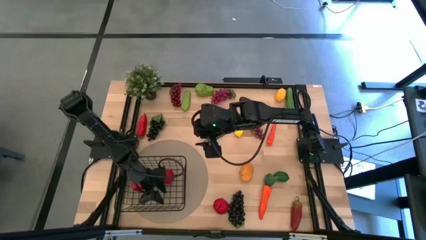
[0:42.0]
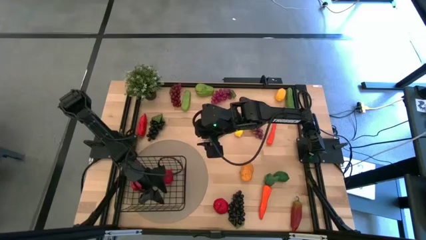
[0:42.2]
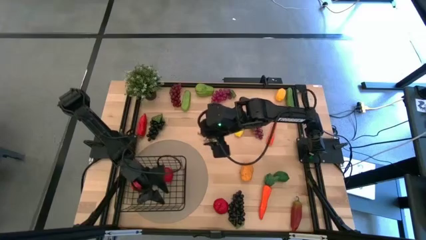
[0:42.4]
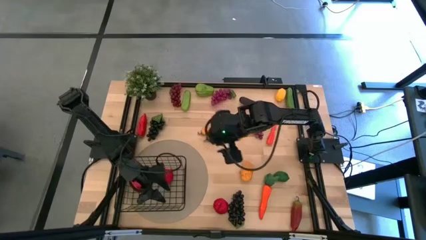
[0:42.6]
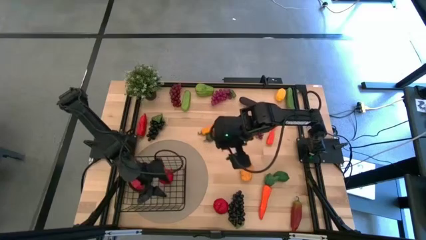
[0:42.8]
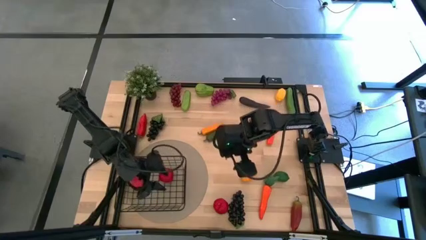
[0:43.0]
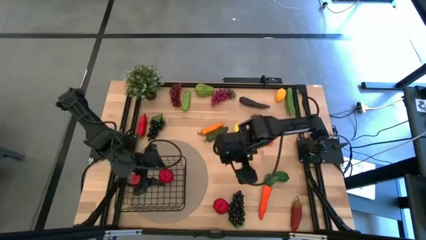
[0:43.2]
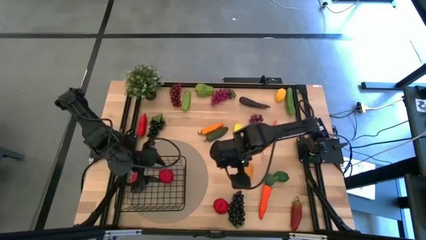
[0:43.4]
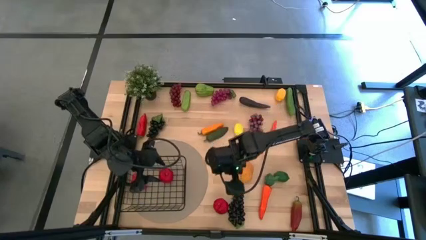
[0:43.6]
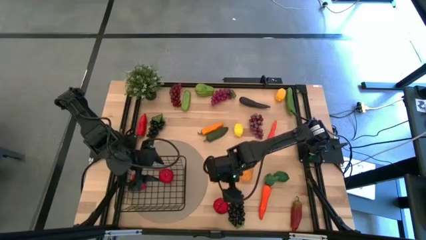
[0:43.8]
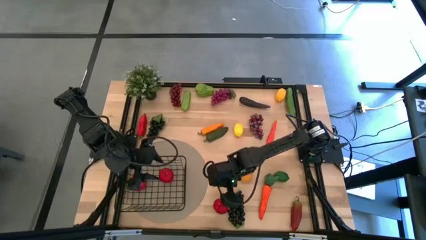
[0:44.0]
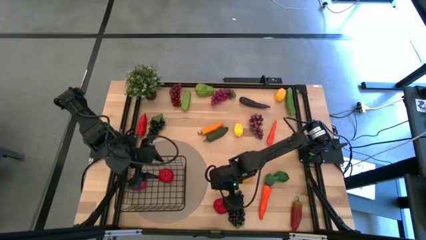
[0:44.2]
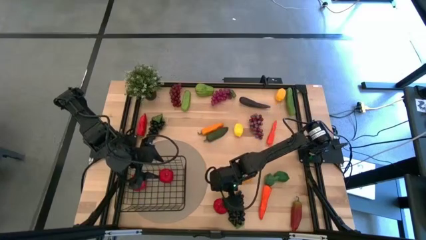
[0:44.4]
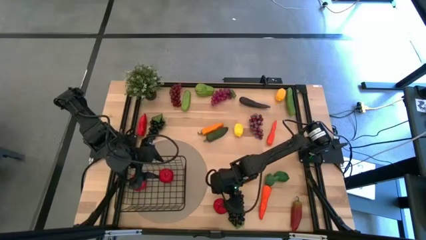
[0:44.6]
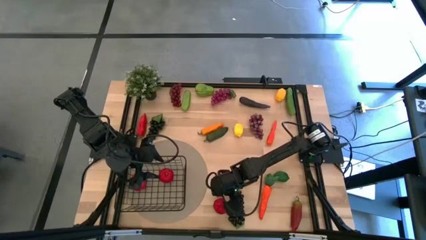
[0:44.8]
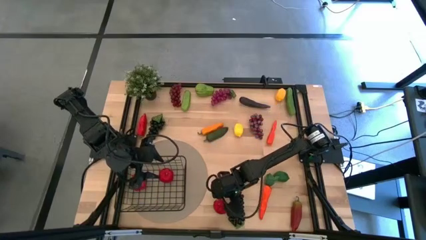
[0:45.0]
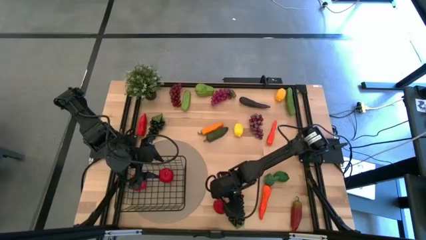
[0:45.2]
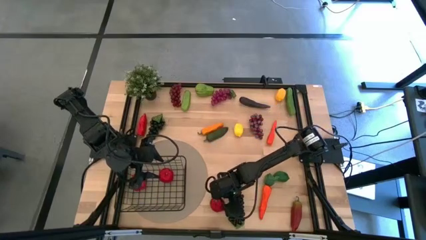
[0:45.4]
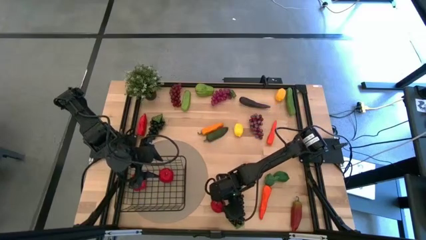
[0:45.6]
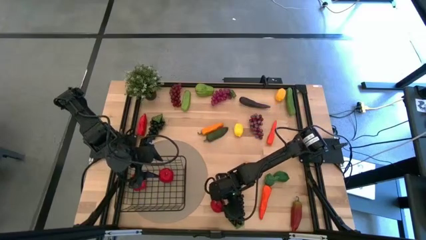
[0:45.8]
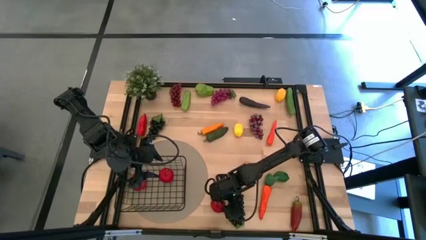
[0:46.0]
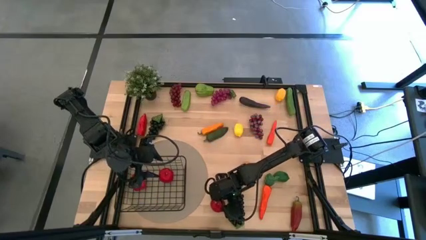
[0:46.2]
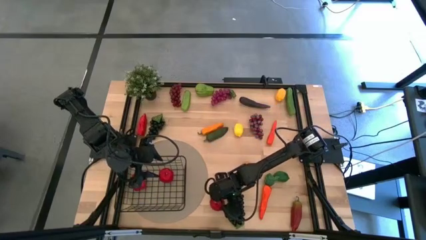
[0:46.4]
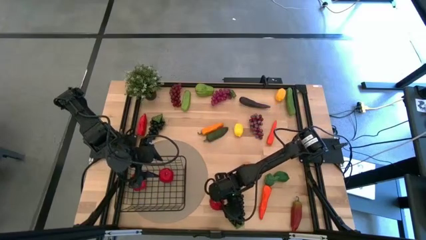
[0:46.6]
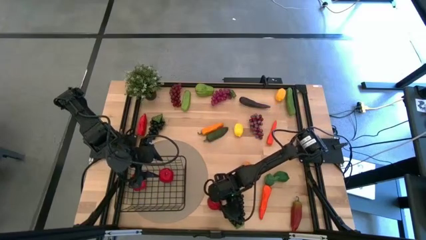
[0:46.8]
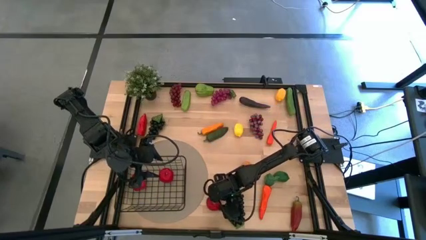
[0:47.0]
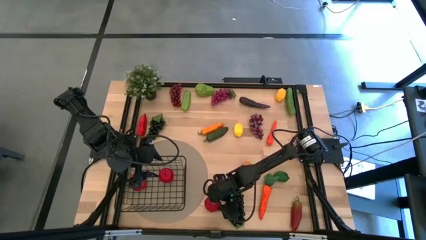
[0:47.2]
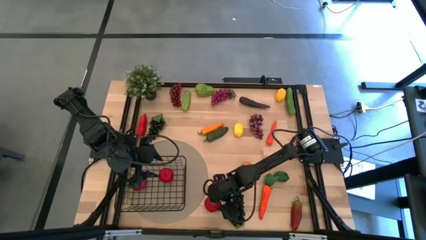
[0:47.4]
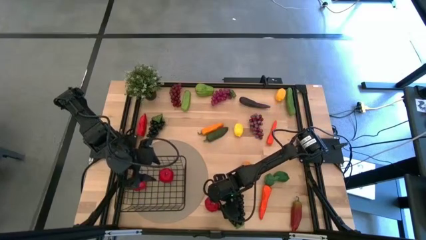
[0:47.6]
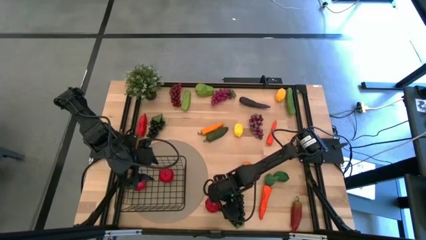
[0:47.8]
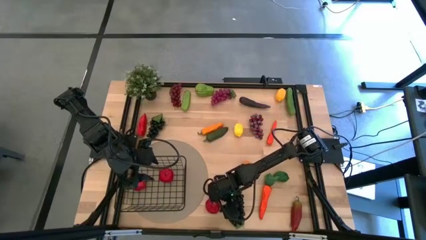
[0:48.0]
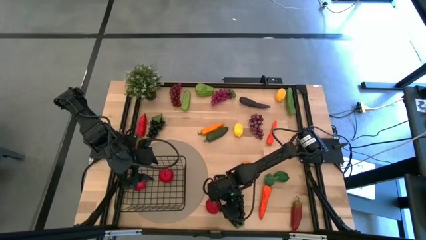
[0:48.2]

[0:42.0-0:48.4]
Task: Build produce basket
Put the red tomato into the black wire basket

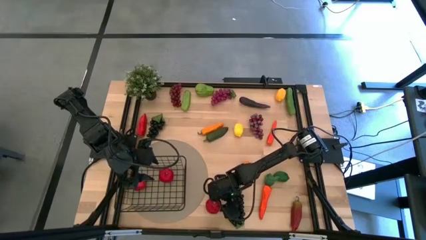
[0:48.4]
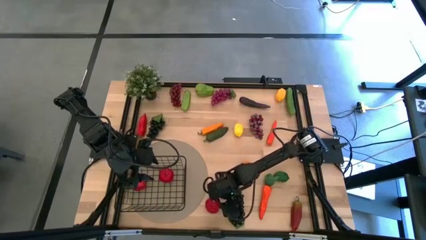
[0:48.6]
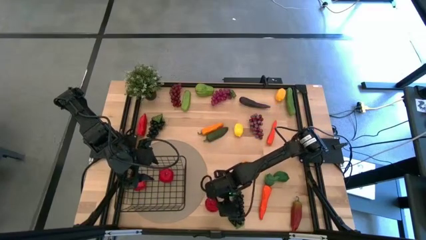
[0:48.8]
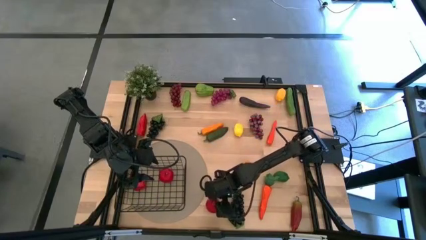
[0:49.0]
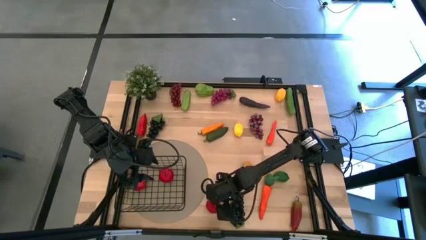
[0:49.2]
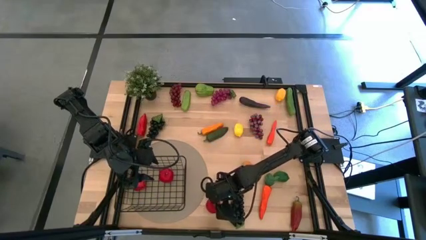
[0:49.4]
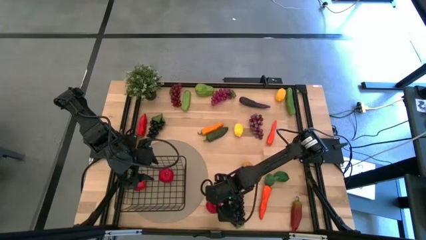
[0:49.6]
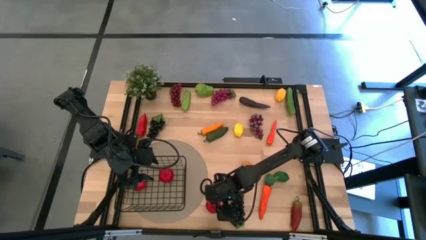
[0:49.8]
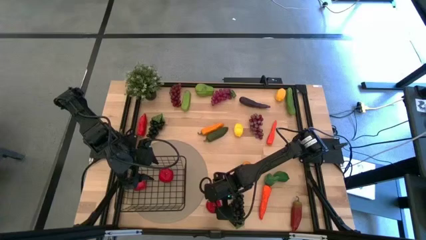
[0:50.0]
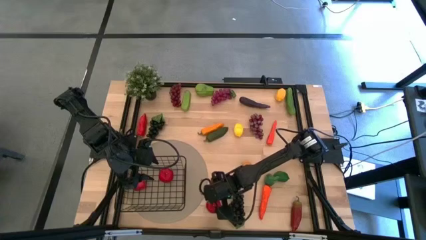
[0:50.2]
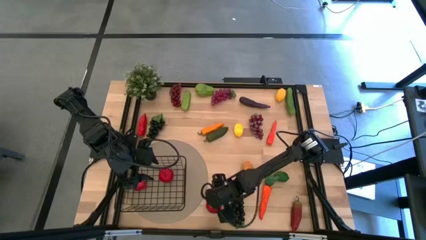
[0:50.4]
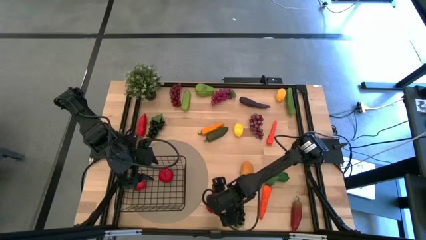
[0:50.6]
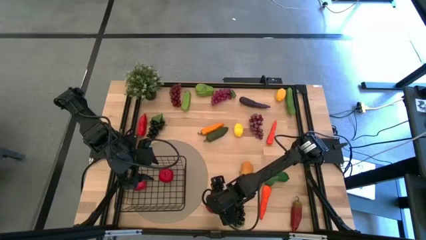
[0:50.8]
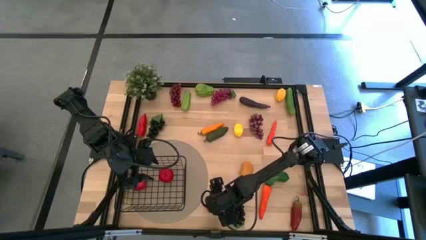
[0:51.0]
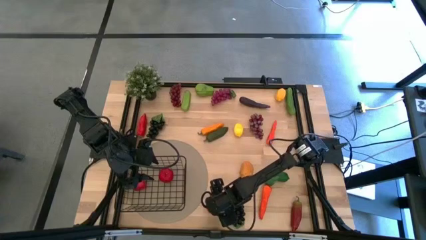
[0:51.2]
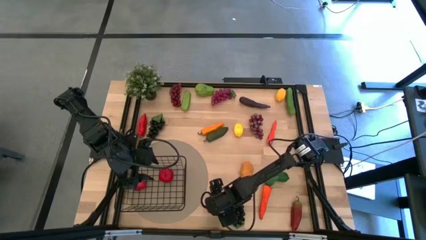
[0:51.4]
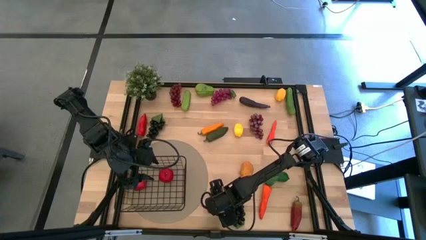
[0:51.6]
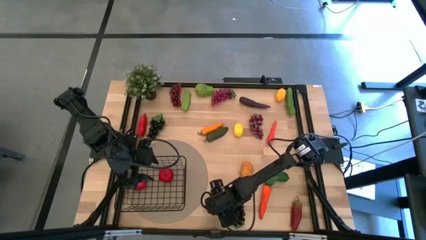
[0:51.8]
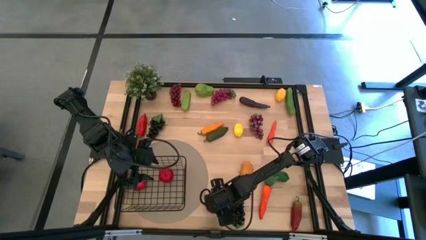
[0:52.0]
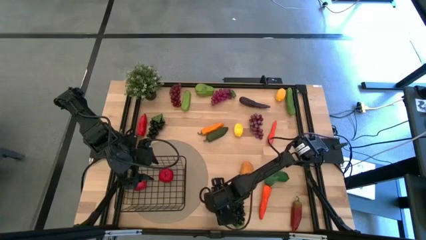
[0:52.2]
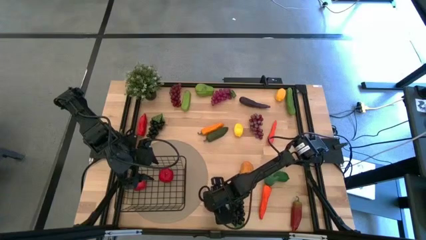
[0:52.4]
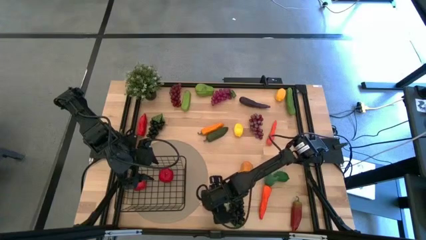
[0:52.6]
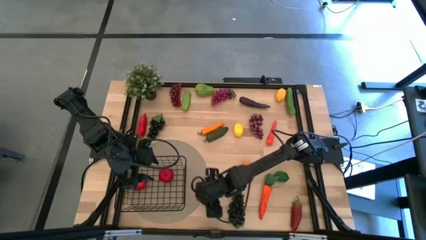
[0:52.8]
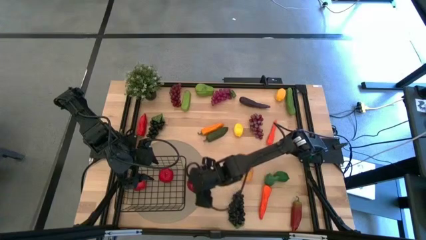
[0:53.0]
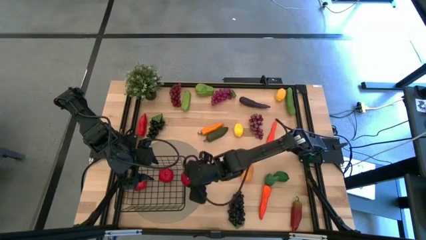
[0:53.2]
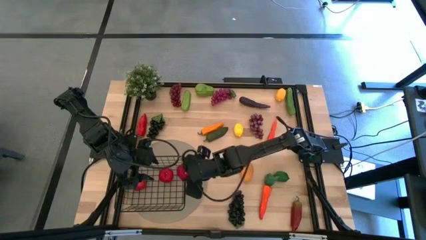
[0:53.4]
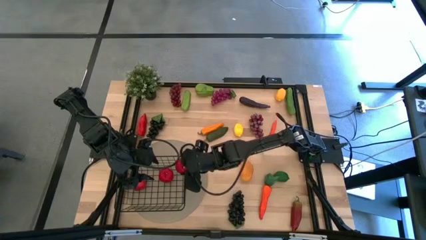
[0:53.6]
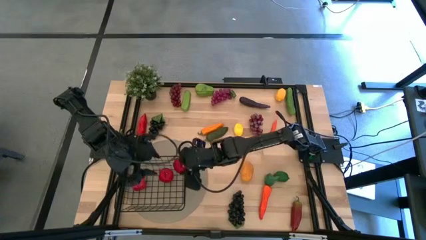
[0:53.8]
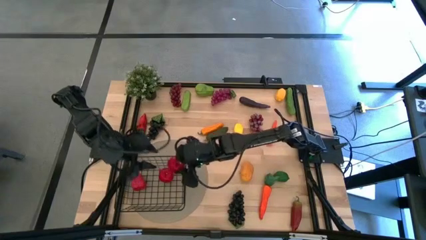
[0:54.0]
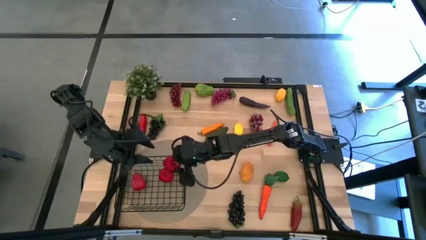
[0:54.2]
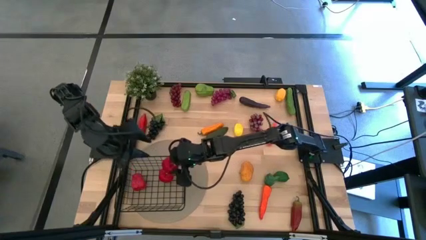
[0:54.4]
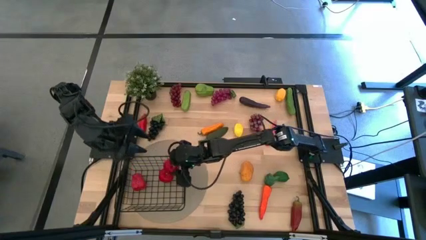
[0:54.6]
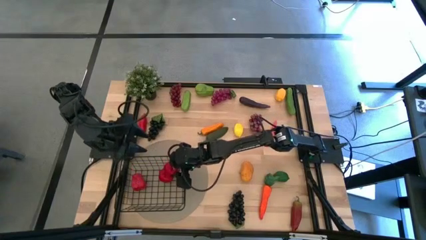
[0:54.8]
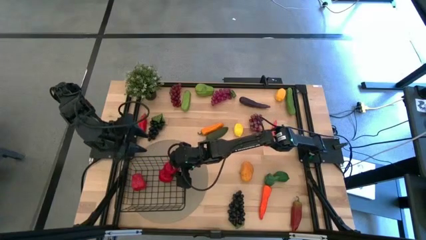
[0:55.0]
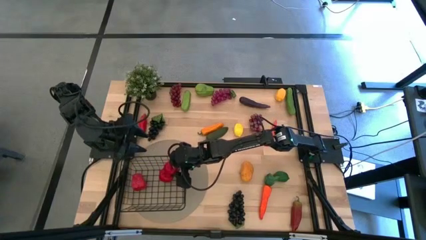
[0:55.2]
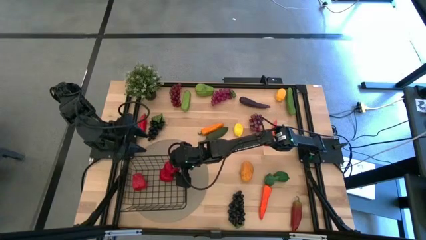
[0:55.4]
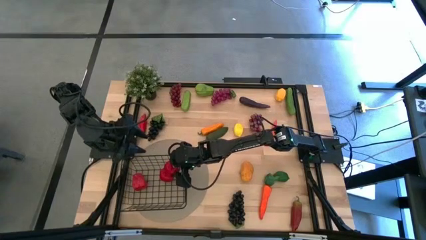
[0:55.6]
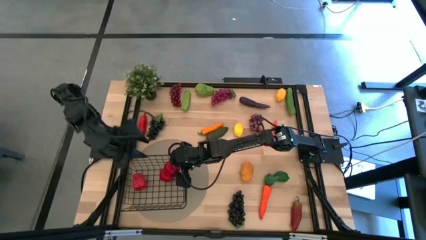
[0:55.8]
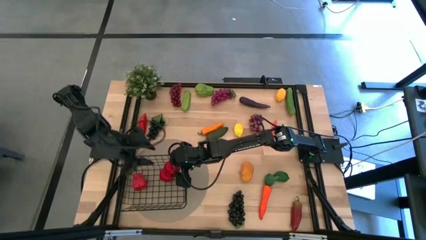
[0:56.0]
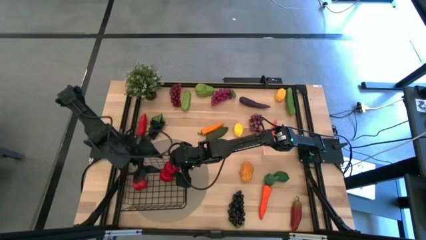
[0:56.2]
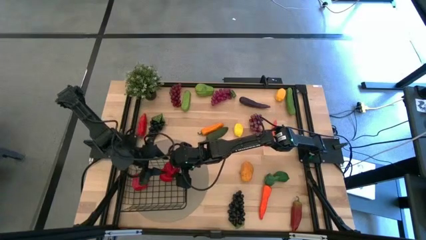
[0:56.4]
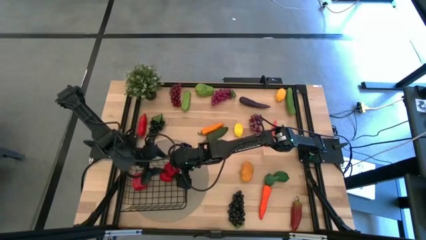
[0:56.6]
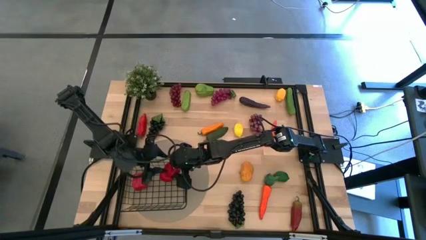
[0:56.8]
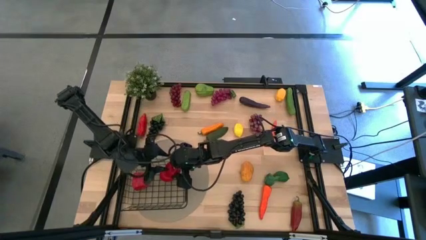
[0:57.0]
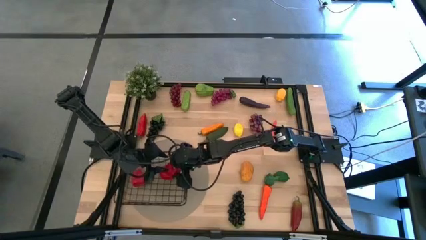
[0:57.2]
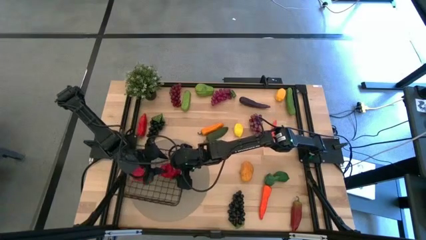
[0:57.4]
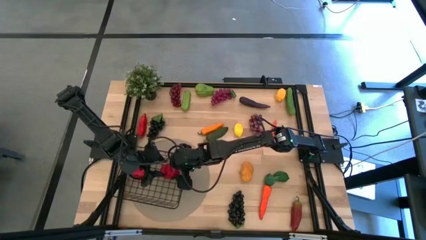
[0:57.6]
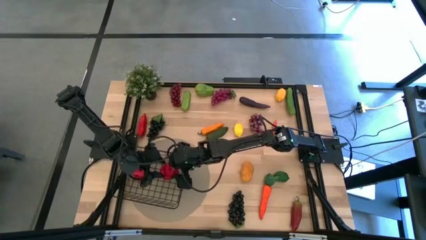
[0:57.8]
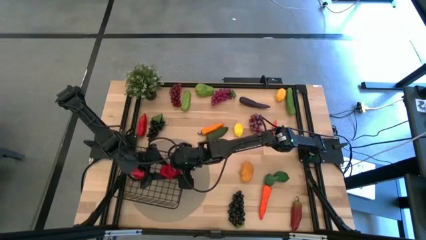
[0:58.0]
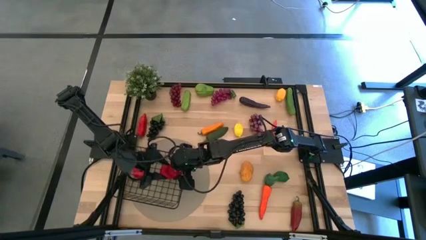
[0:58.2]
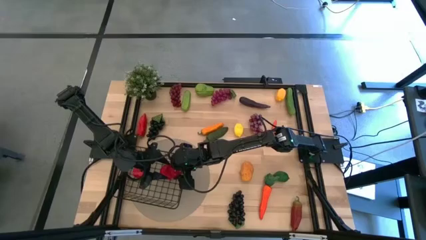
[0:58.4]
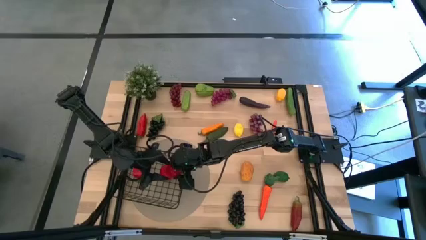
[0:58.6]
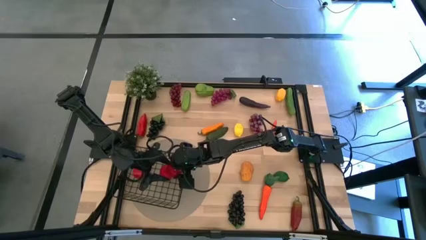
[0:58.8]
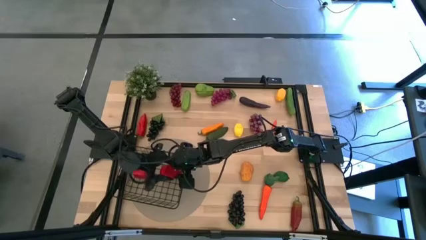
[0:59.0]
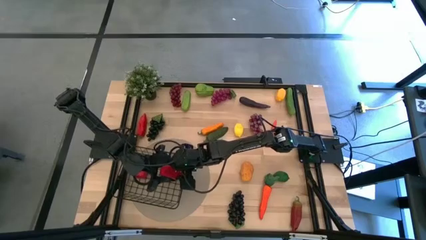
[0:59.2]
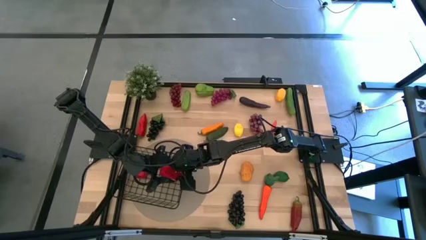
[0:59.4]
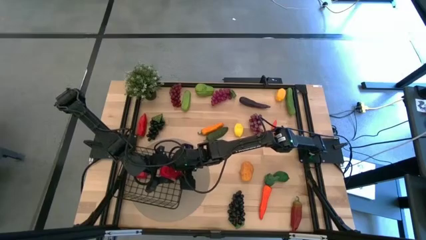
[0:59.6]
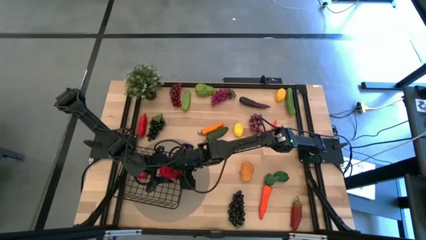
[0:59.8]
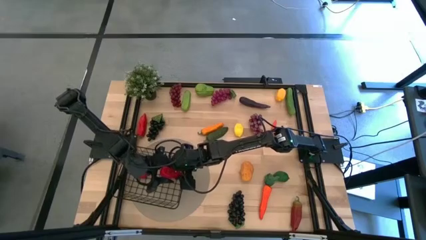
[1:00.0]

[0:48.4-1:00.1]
Put the red tomato into the black wire basket
